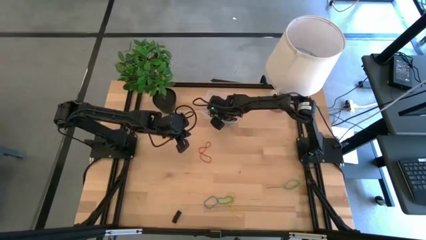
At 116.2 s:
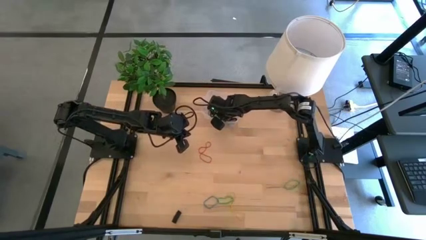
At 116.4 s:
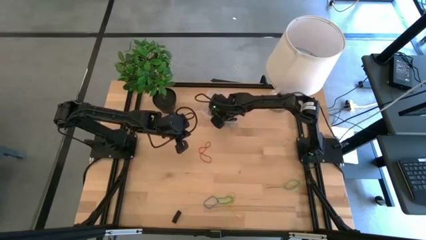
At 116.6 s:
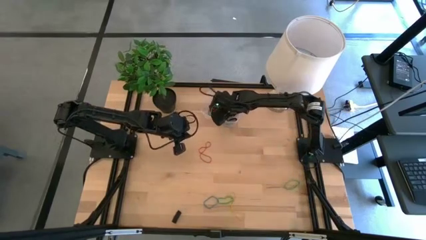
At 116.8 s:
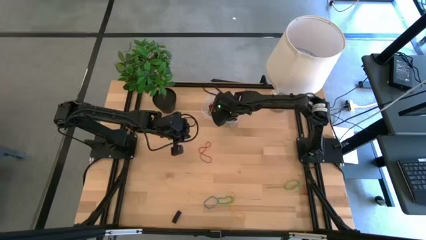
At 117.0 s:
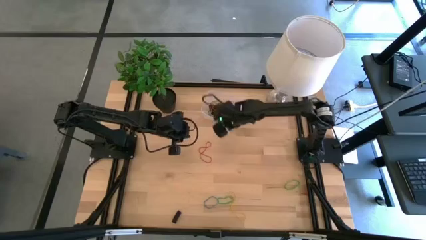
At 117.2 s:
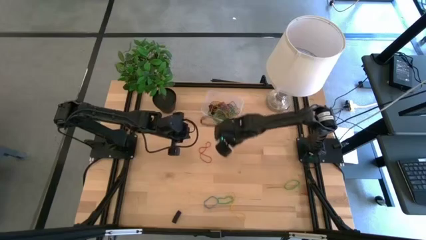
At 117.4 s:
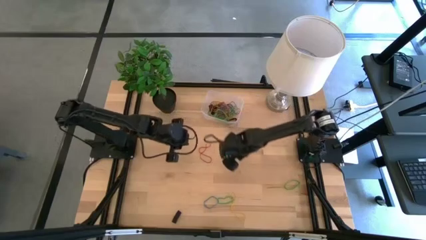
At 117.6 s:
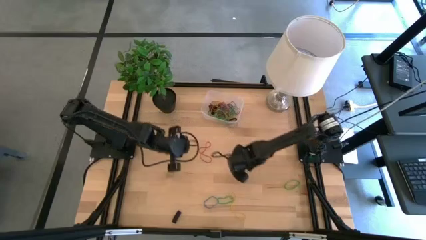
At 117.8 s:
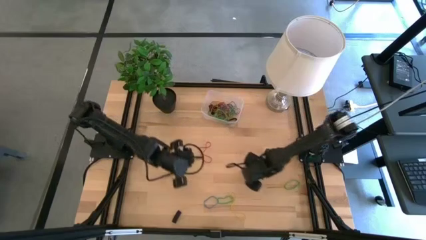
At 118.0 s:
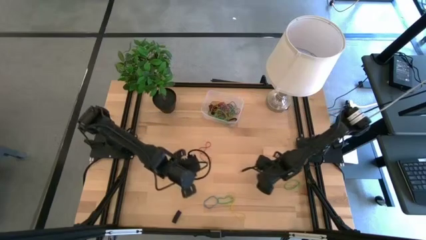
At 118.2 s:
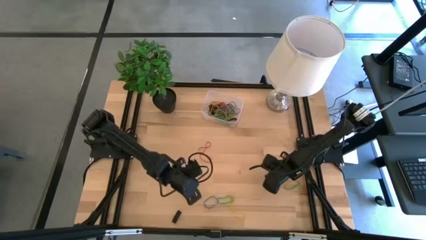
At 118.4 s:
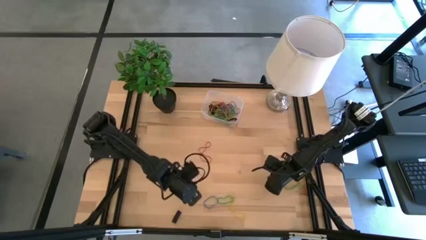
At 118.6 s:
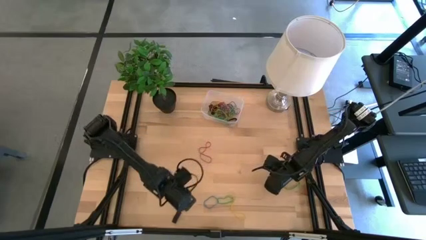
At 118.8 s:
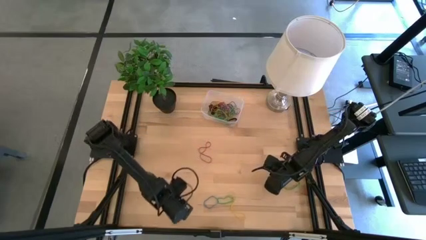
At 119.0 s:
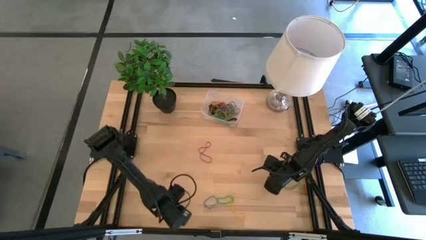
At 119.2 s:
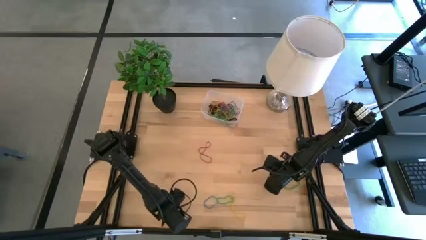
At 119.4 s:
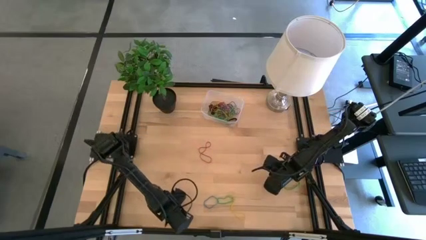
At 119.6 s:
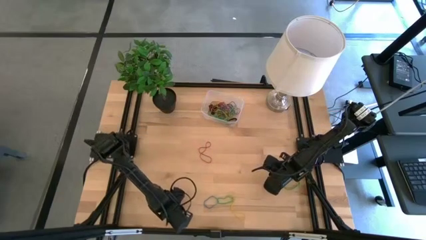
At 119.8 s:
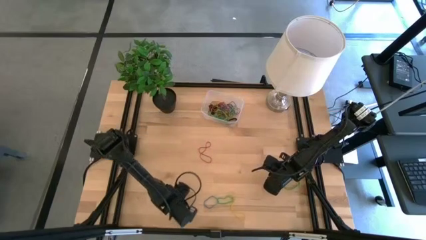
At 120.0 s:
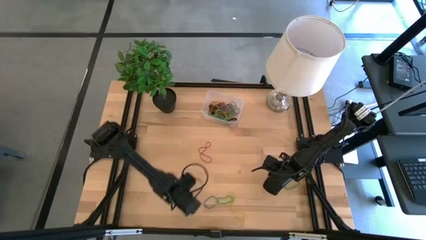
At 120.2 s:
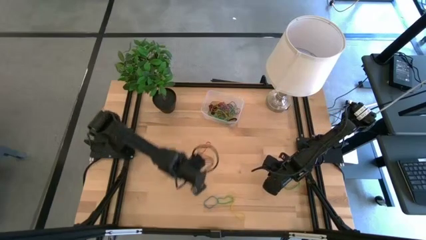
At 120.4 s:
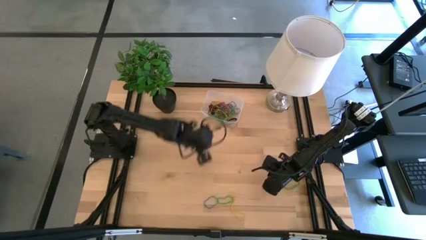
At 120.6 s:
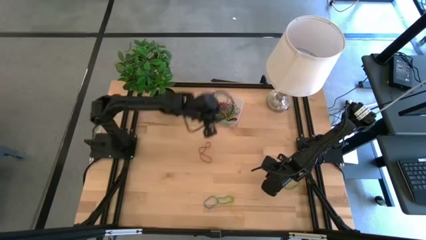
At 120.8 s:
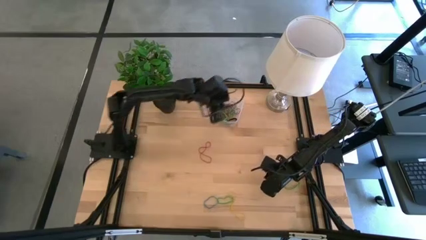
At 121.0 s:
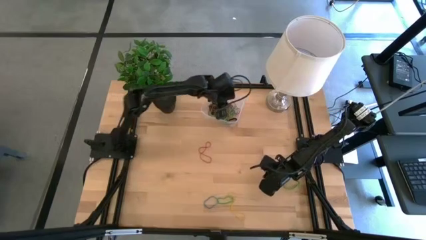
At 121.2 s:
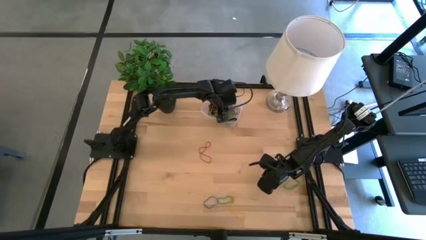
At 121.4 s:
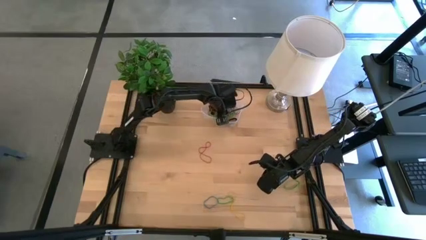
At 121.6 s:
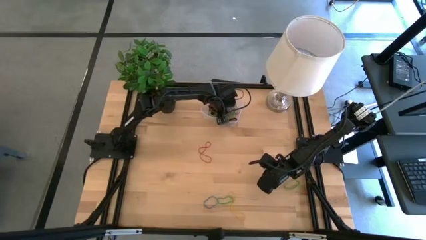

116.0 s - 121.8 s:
Task: Pick and place rubber bands into bin
Put the black rubber band into the transparent bin

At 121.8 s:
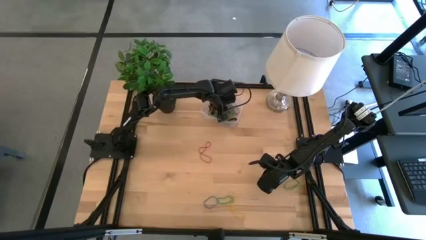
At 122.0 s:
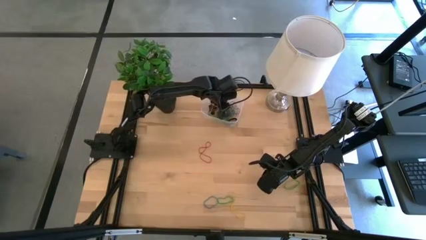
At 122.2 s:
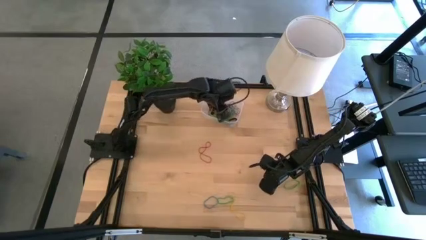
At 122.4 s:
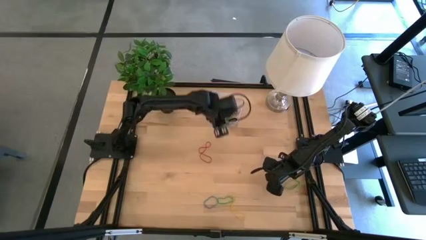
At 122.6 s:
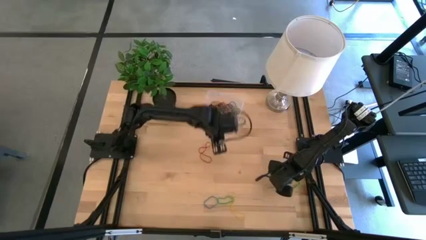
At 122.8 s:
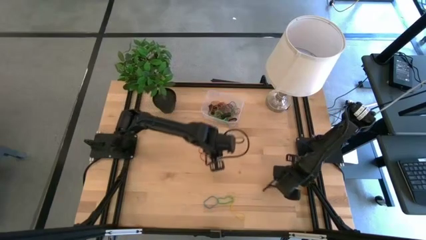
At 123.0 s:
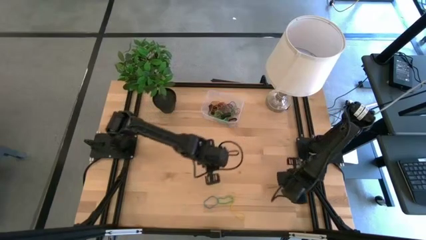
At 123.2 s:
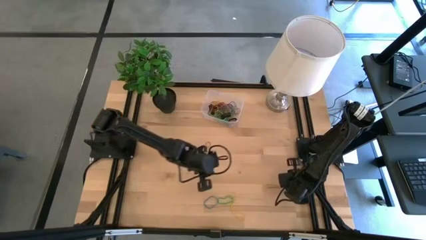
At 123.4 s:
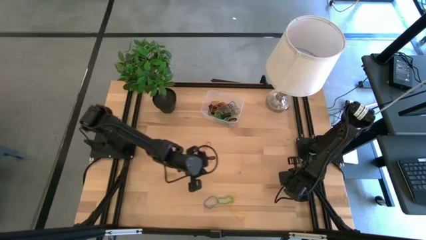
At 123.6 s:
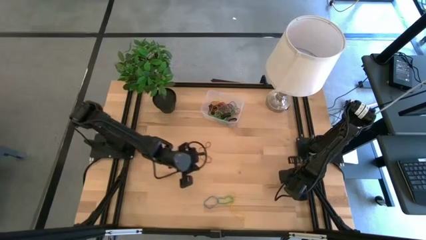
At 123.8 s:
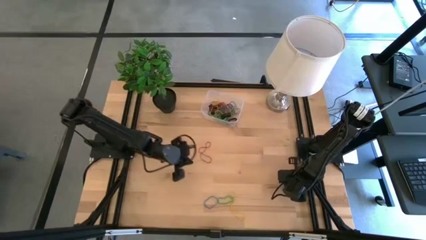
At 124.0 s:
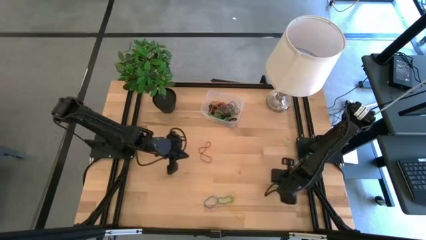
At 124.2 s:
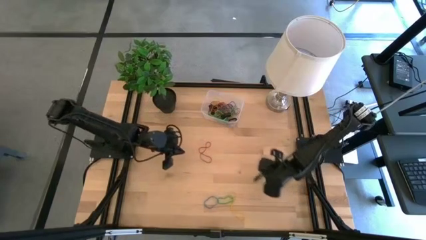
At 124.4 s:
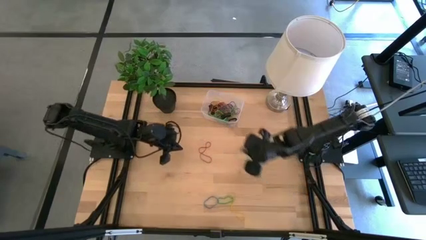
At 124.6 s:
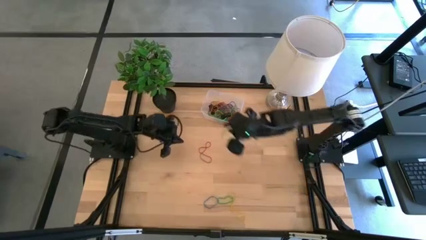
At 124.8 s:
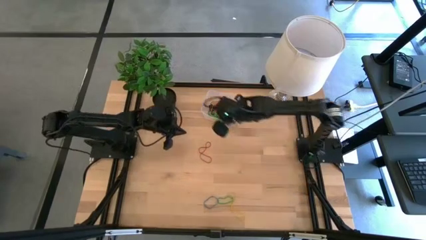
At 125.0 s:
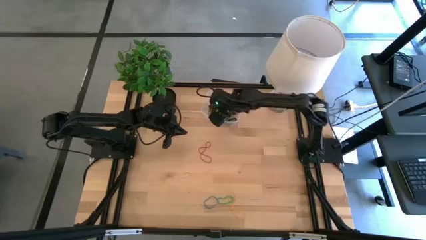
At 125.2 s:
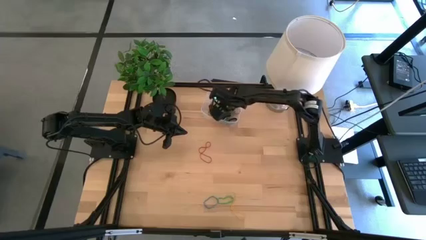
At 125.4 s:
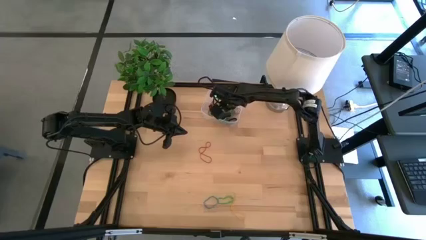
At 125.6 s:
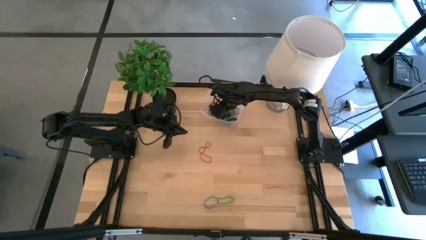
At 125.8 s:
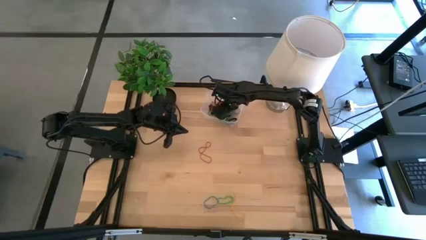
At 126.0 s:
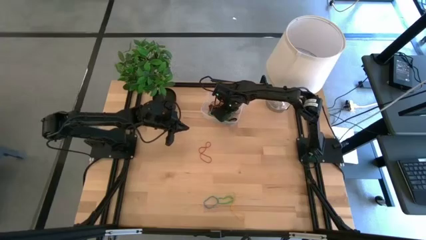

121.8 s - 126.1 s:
Put the green rubber band into the transparent bin

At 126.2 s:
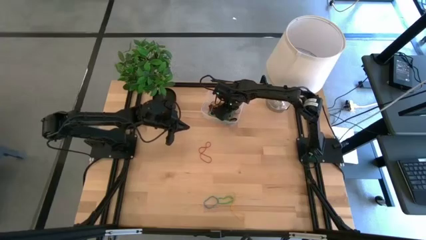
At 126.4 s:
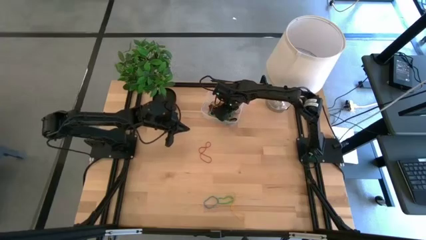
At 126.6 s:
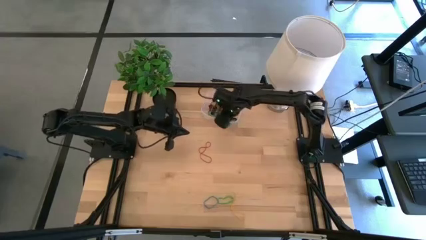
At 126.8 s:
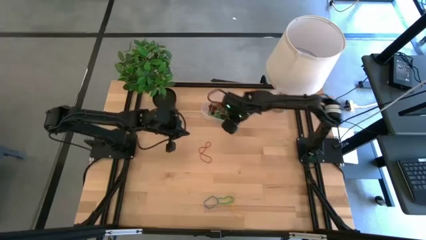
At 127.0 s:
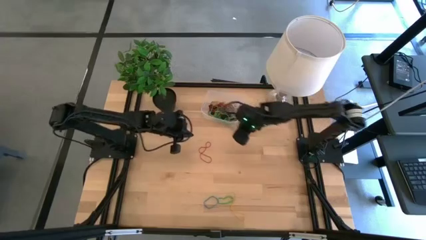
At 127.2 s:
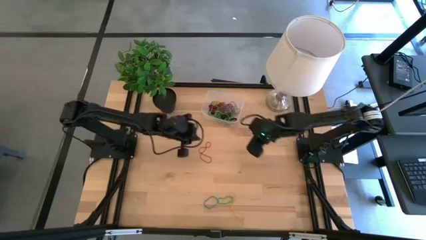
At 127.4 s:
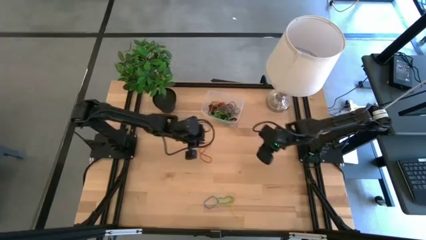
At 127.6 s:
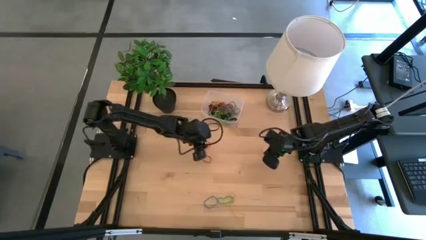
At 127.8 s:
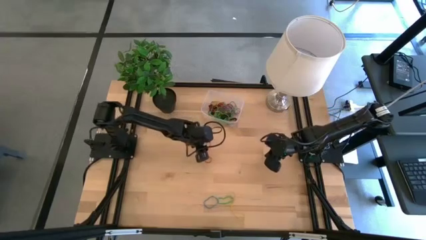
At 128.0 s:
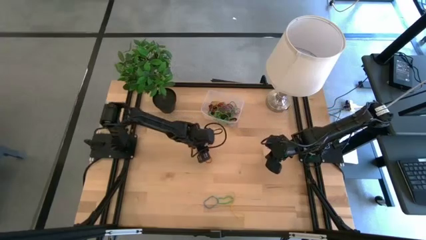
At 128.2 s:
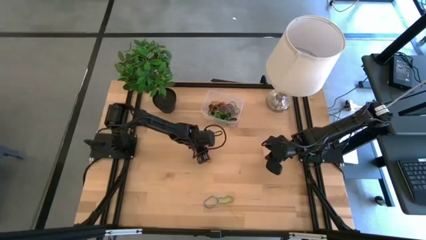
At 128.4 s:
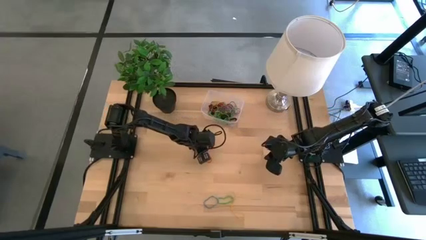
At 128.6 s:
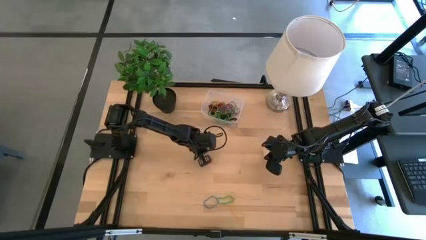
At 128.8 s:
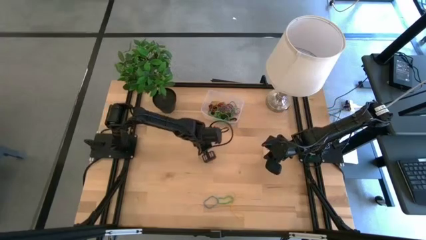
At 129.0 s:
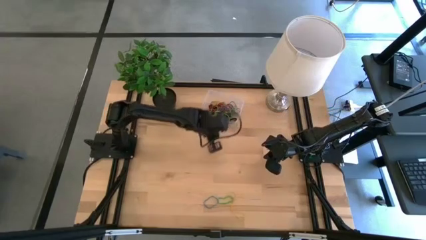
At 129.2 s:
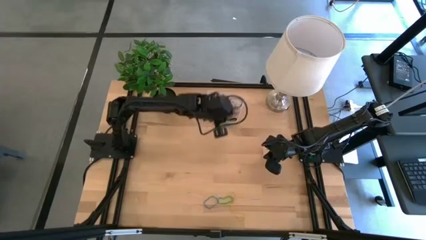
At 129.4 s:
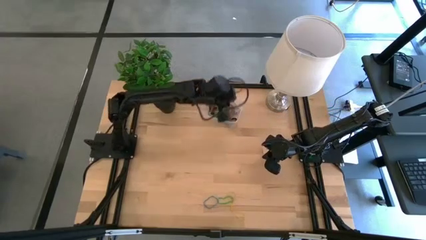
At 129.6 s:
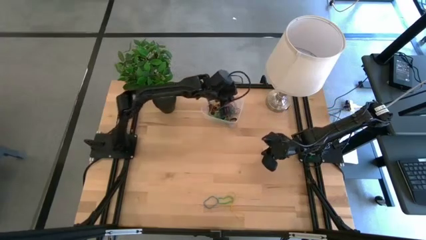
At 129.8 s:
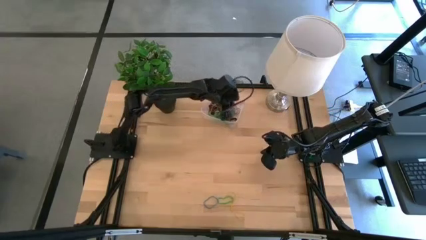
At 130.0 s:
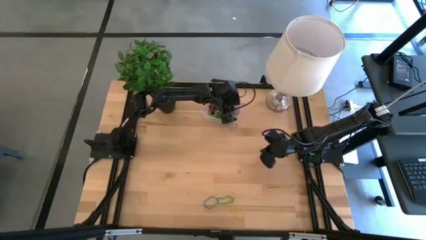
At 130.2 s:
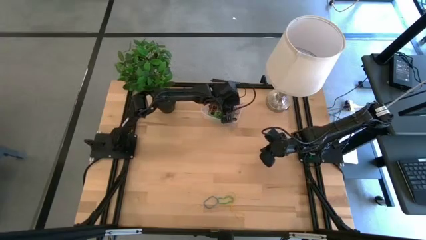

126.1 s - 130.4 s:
Put the red rubber band into the transparent bin

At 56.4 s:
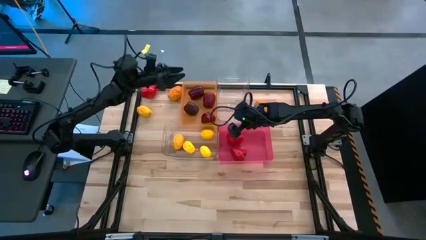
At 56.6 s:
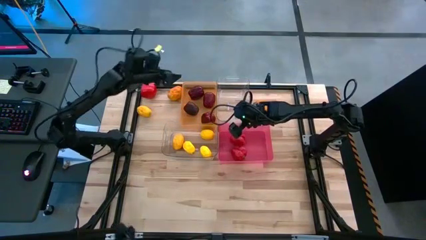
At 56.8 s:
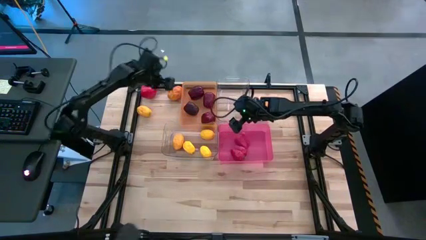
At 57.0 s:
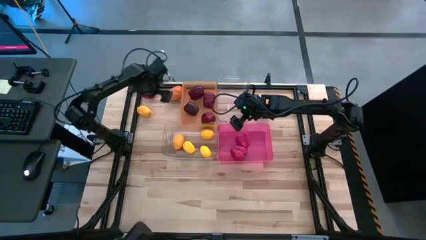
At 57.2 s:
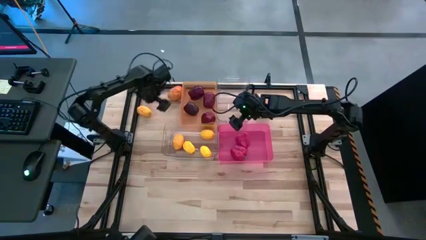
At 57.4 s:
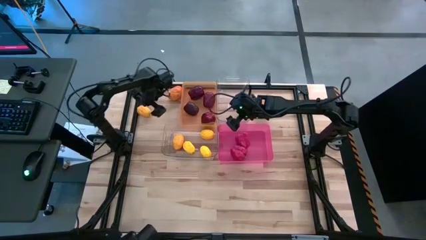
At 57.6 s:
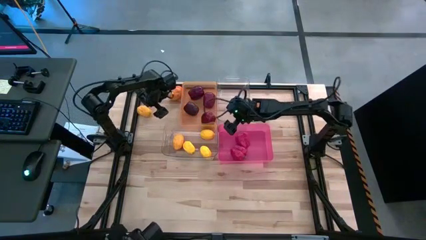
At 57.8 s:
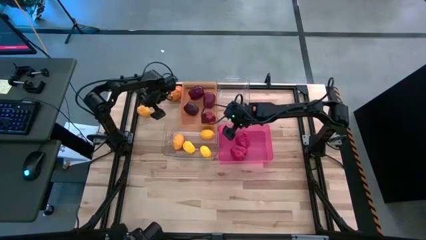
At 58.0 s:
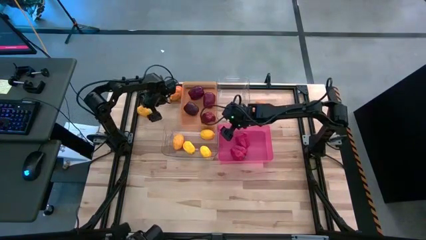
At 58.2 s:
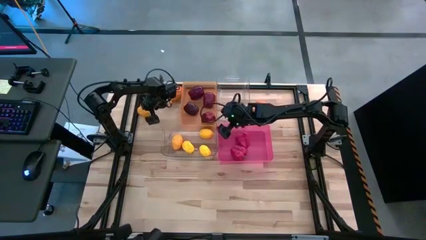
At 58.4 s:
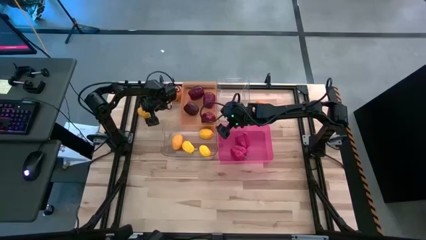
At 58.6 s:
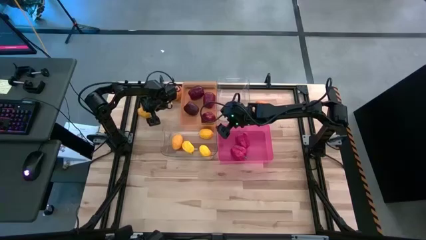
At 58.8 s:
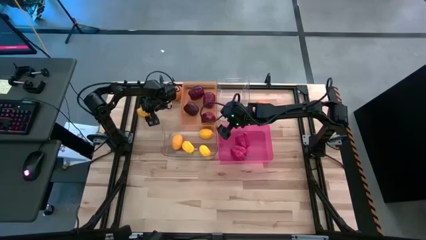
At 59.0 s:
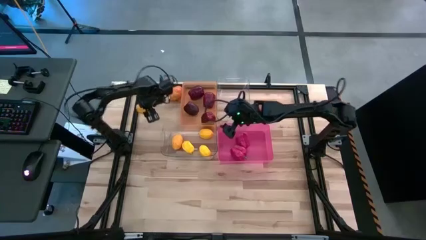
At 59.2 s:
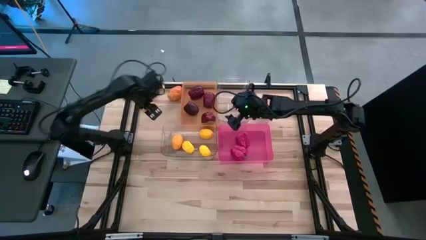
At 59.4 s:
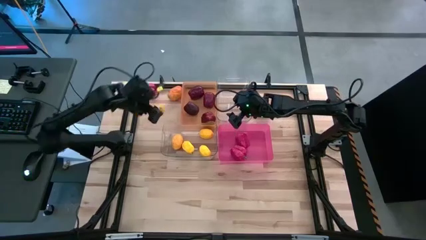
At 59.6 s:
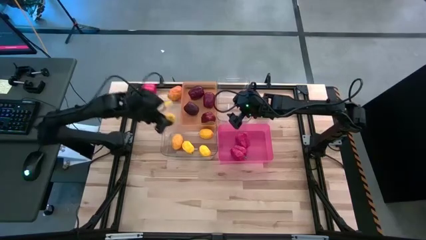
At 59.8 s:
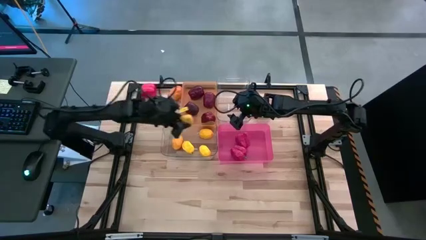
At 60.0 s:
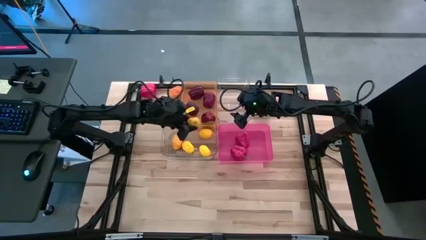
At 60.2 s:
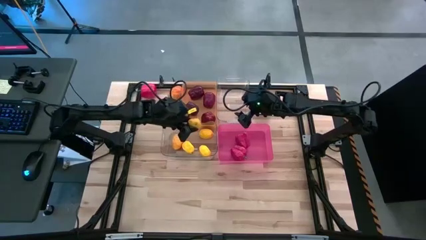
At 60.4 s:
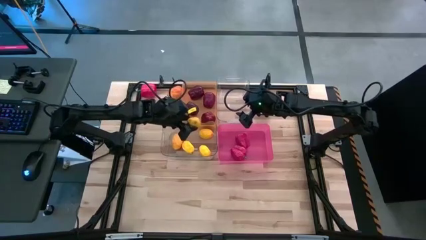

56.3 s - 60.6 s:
Task: Sort produce into baskets
Put the yellow lemon into the bottom transparent bin
